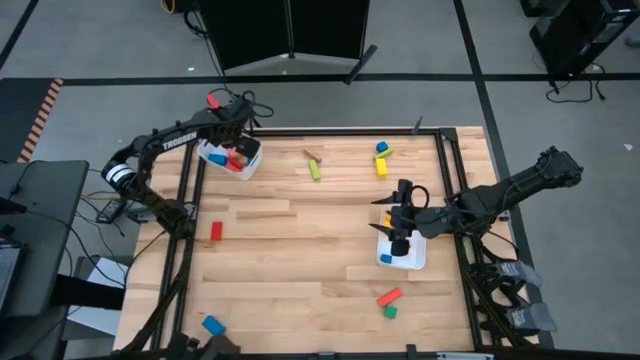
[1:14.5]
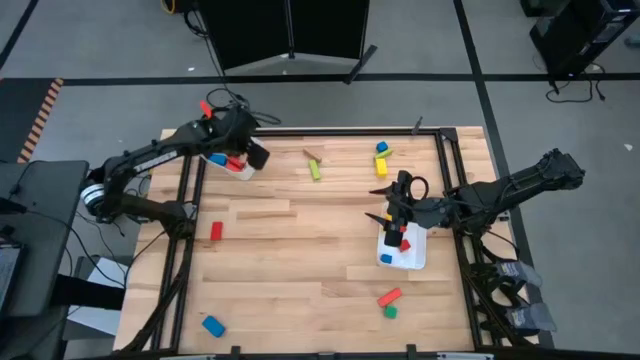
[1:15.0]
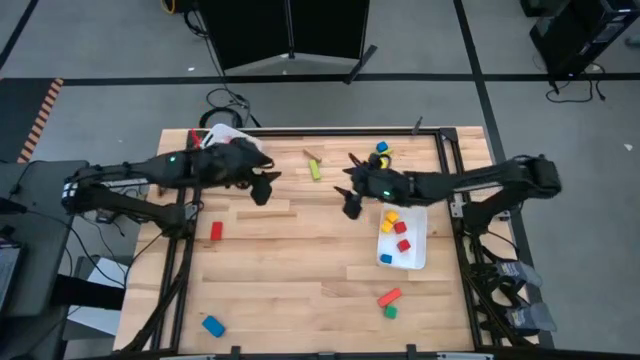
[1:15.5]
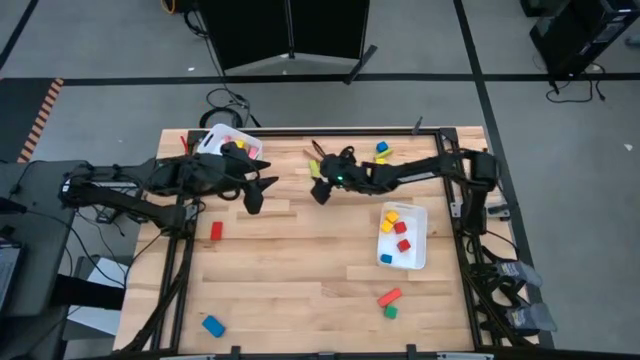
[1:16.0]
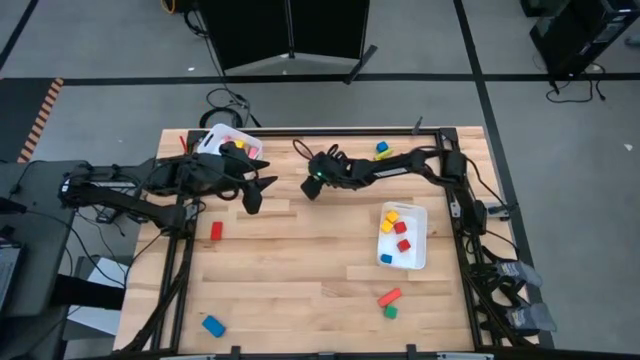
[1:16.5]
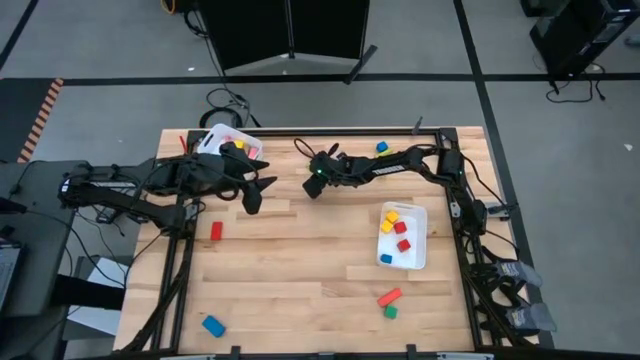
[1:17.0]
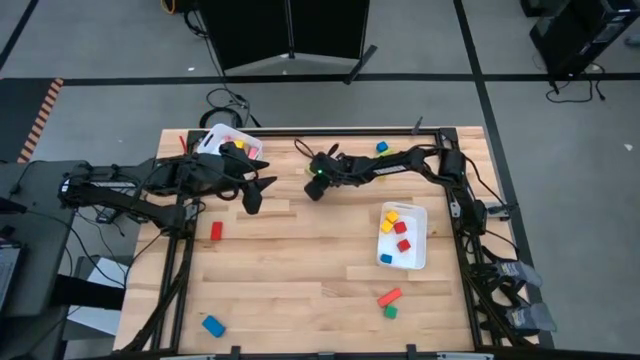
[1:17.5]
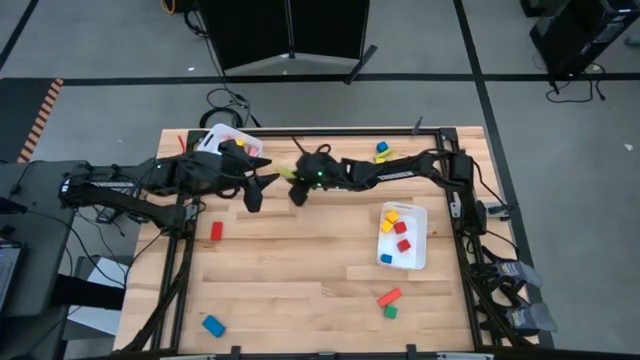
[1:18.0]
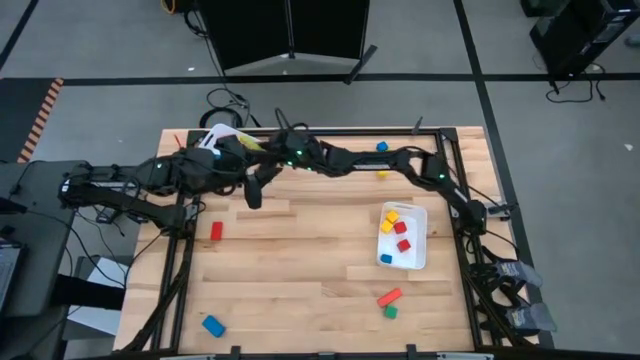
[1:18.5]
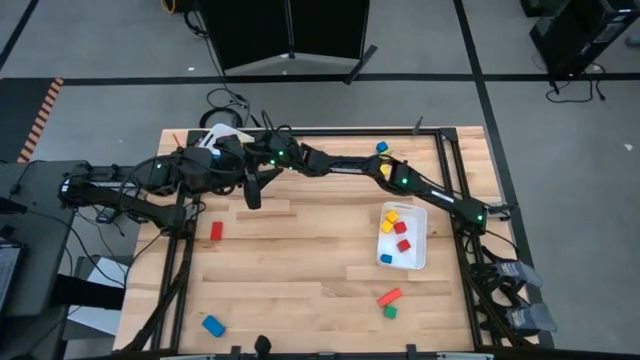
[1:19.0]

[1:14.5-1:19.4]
Task: Sort blocks by size
Put the left light green rectangular block into the top white bin

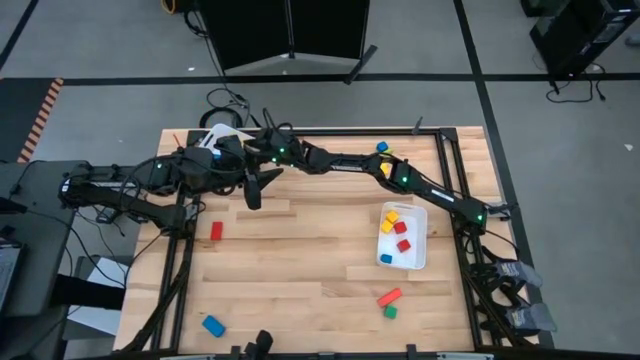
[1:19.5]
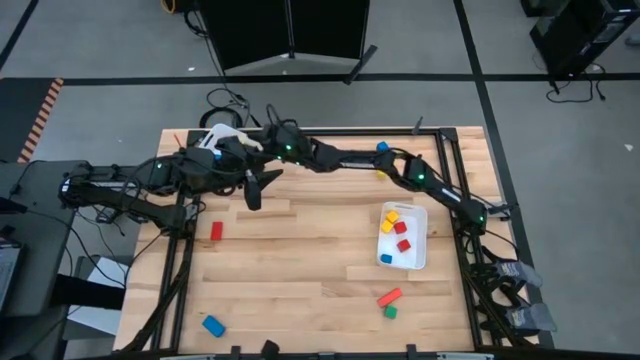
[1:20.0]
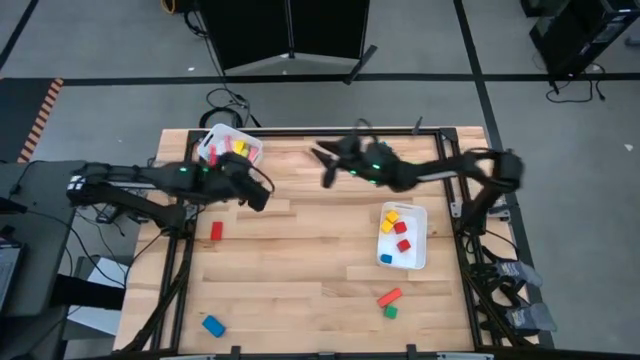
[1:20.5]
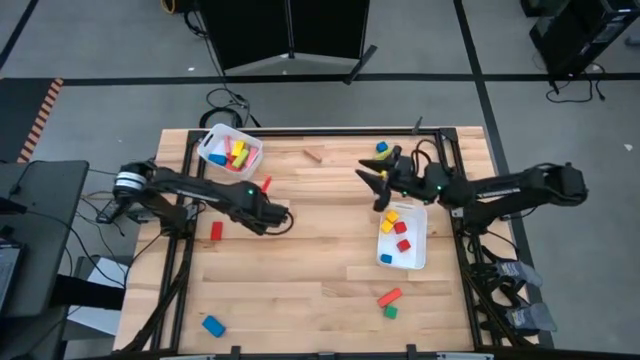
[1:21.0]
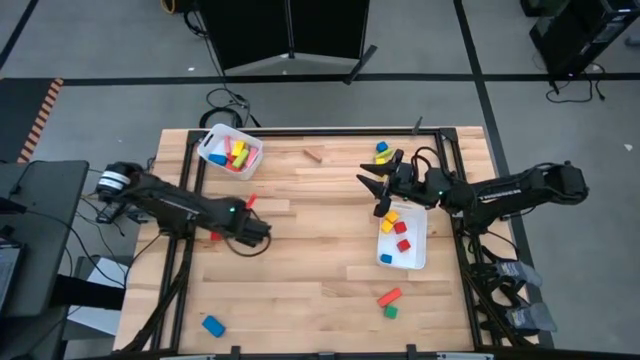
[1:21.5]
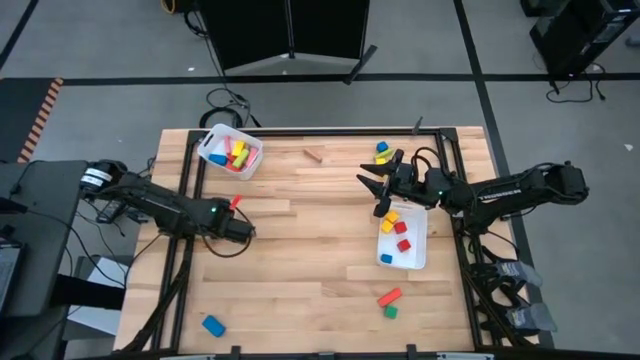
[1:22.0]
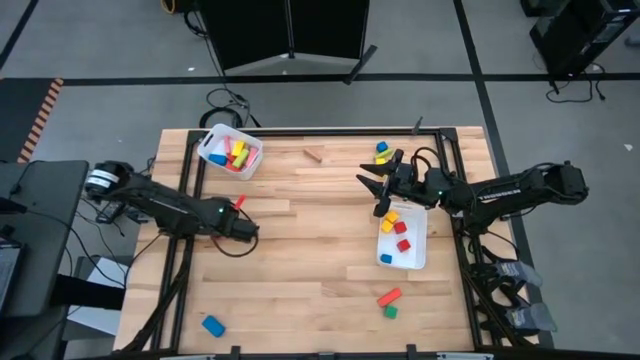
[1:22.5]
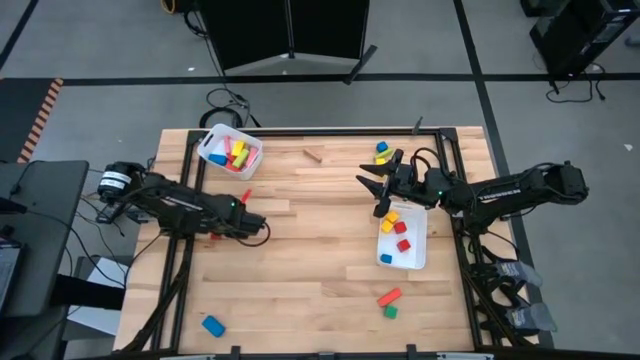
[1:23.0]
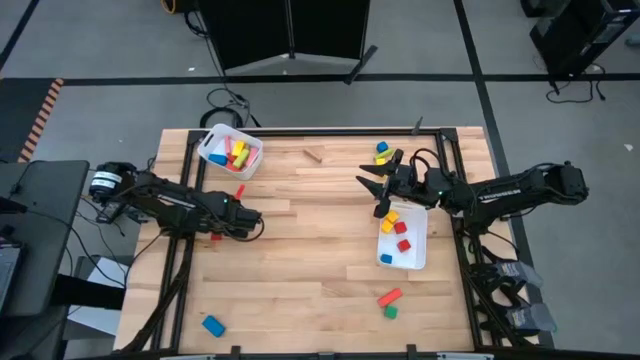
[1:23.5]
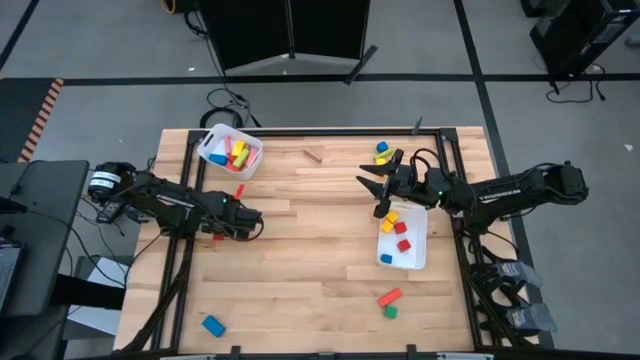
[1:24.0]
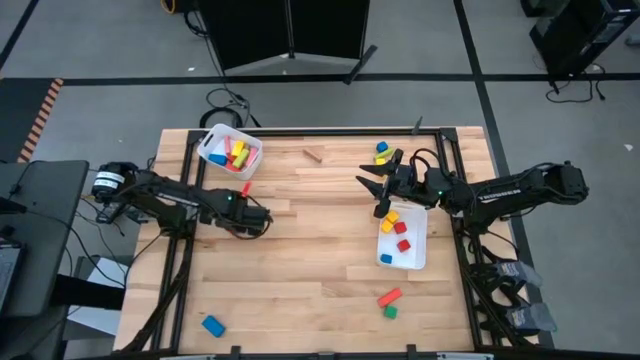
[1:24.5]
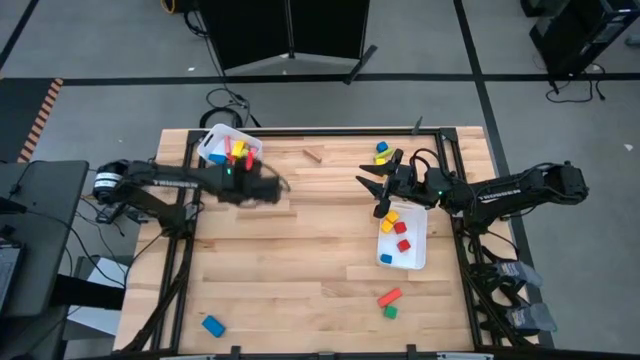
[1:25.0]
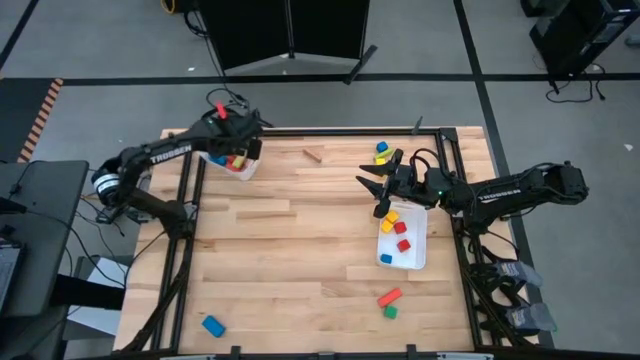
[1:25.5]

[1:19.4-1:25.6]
Put the red rectangular block into the top white bin

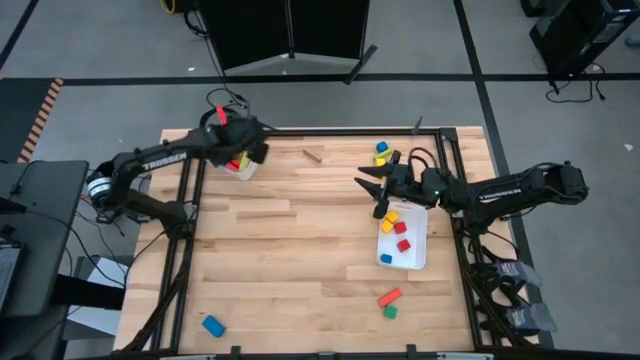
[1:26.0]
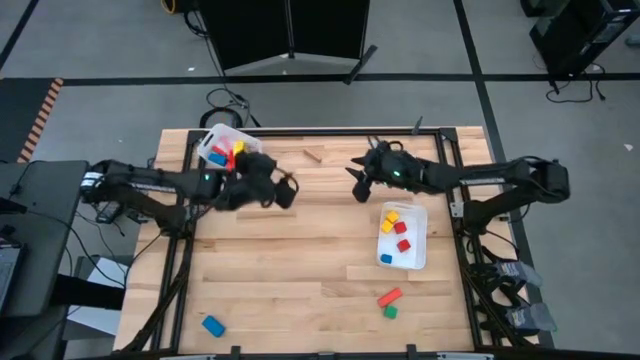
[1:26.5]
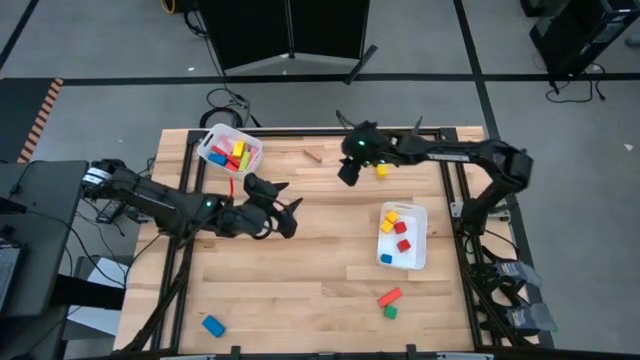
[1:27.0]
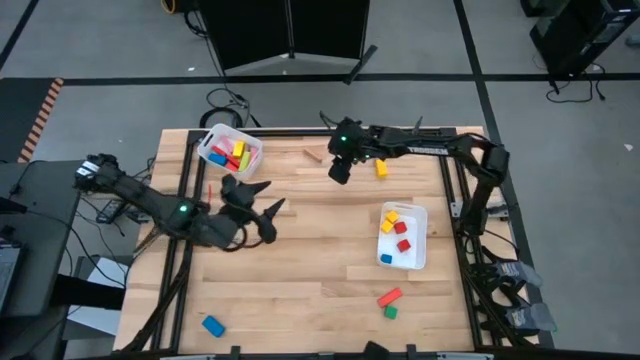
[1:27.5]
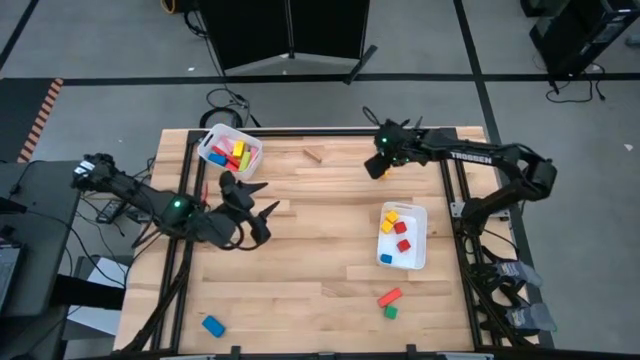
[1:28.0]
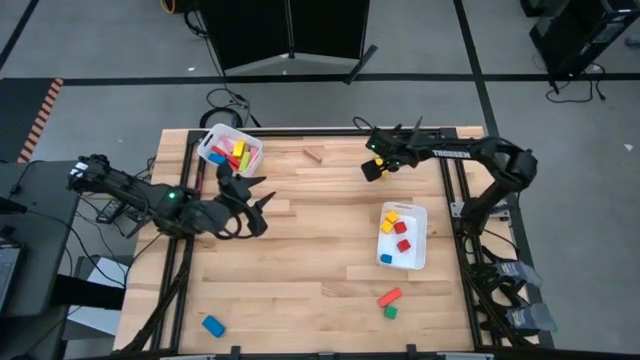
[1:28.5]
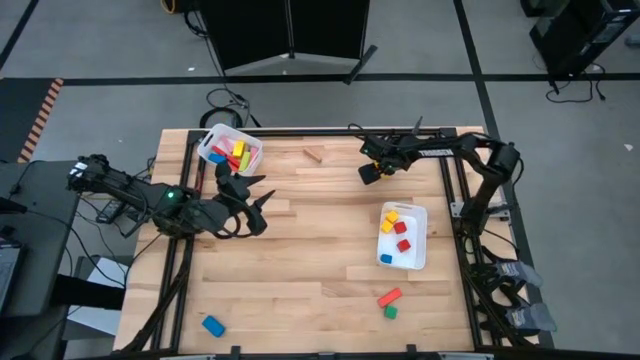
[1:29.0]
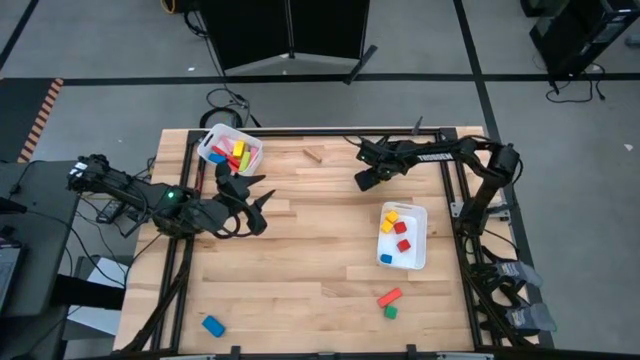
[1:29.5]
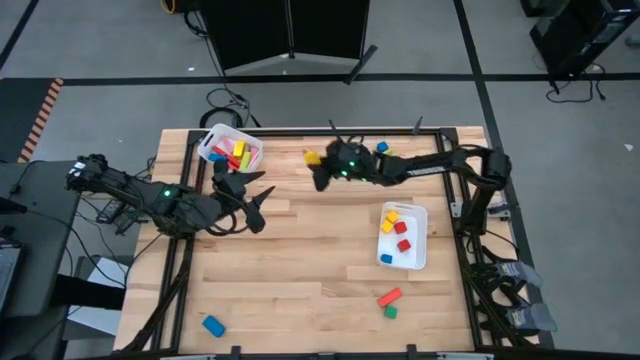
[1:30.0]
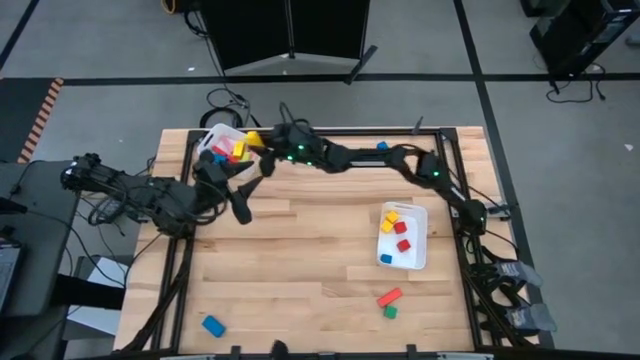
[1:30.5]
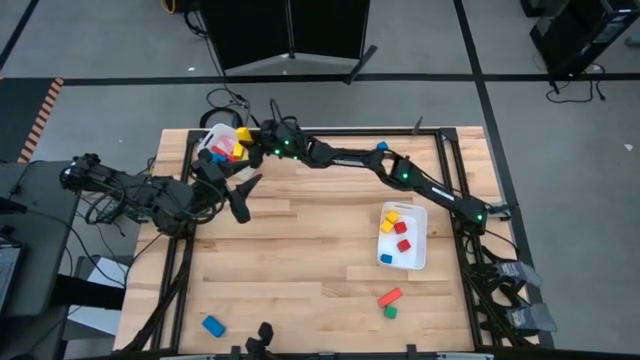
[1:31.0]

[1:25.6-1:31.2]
Put the yellow rectangular block into the top white bin

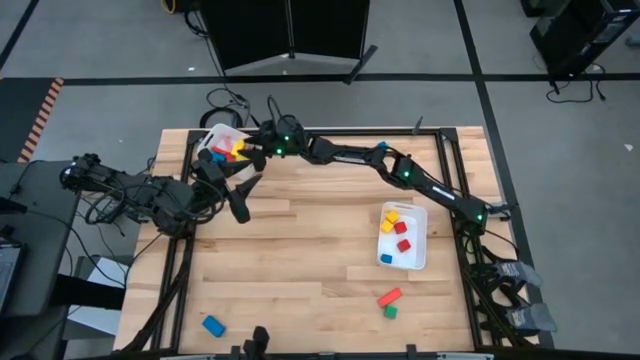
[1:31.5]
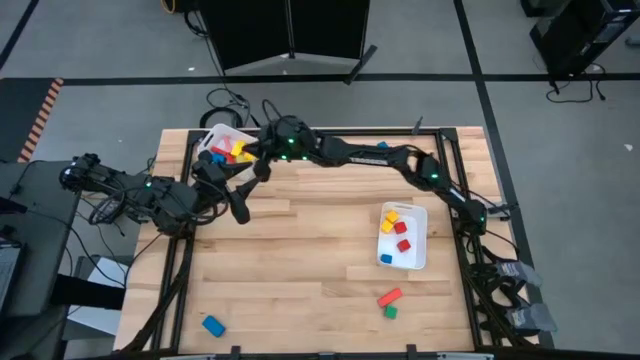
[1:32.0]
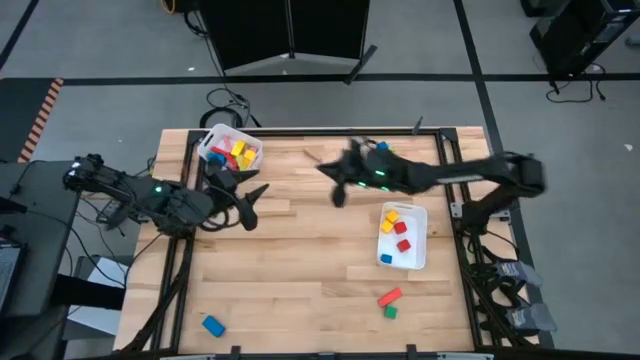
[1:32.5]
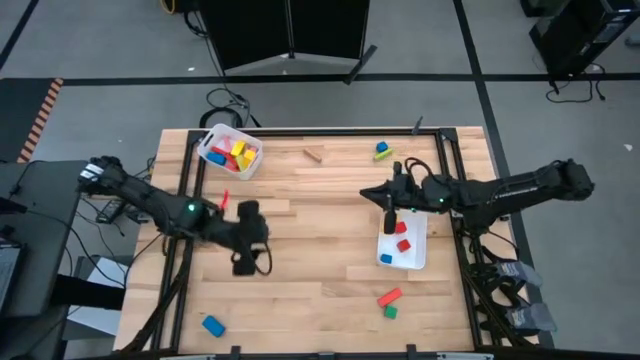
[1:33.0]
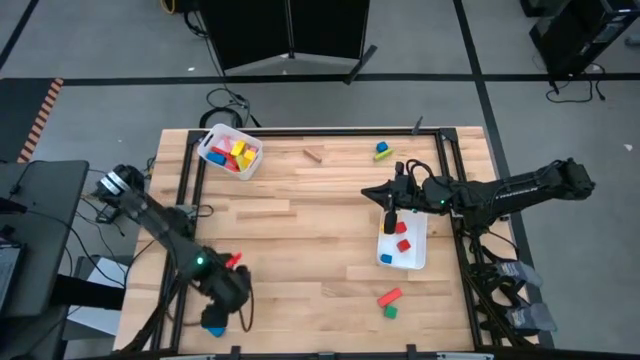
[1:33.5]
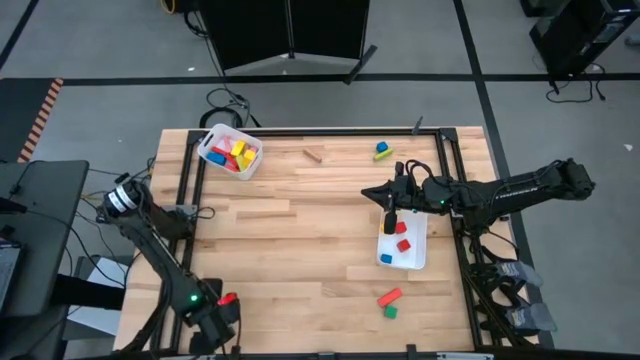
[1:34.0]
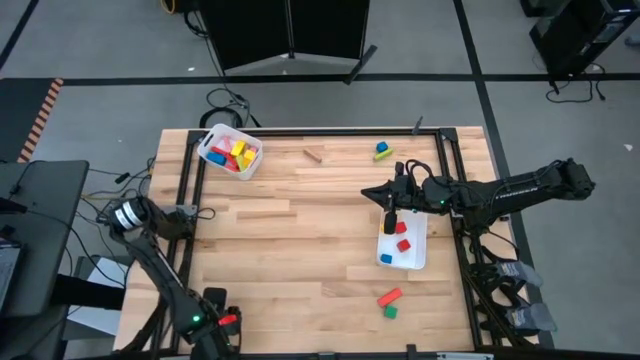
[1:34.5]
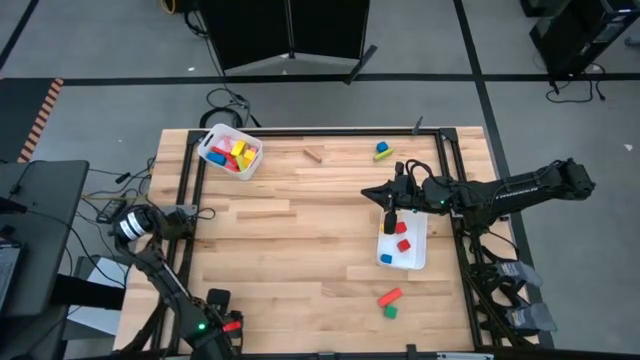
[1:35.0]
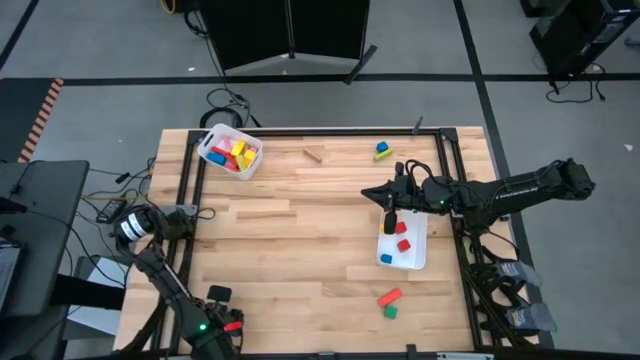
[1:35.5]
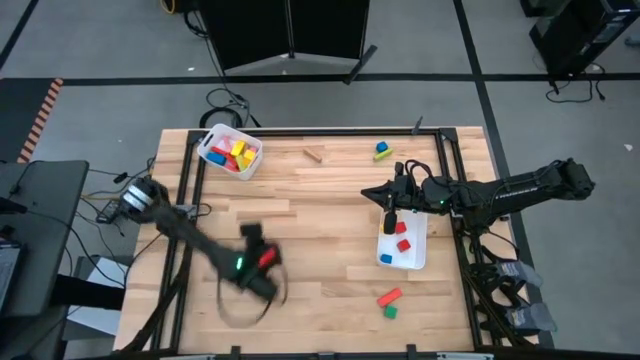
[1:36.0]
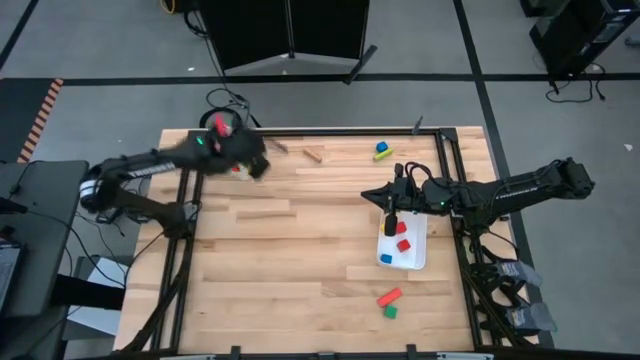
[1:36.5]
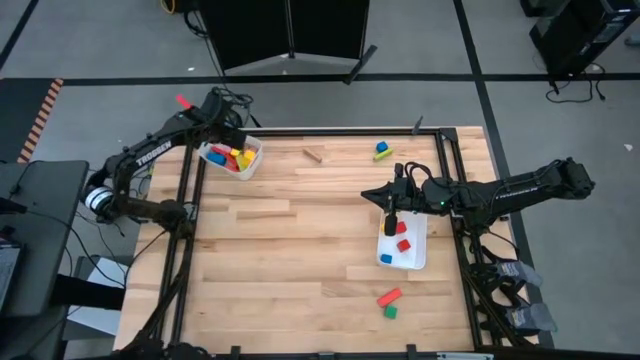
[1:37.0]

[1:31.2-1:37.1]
Put the blue rectangular block into the top white bin
